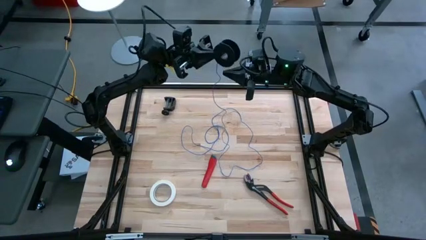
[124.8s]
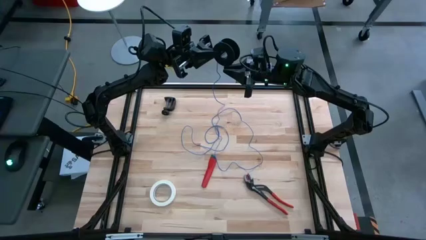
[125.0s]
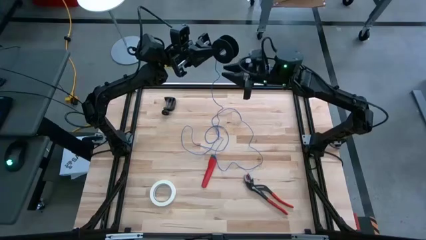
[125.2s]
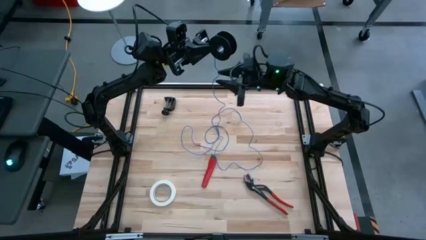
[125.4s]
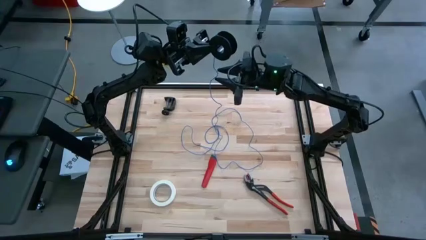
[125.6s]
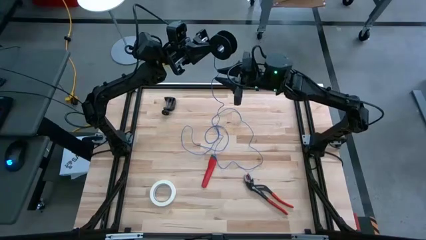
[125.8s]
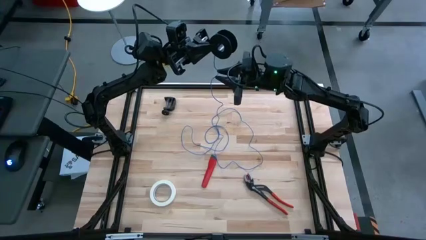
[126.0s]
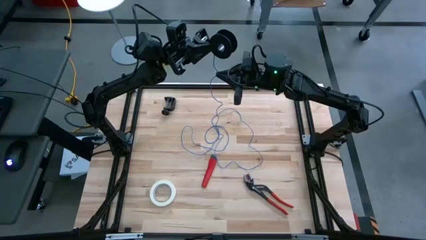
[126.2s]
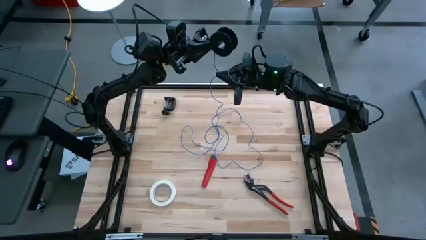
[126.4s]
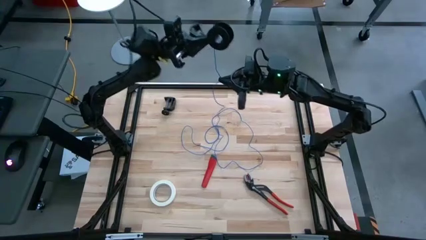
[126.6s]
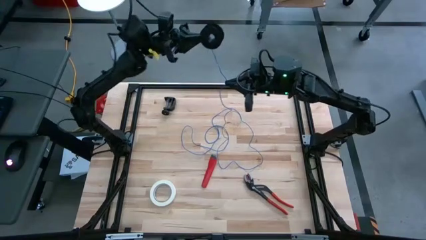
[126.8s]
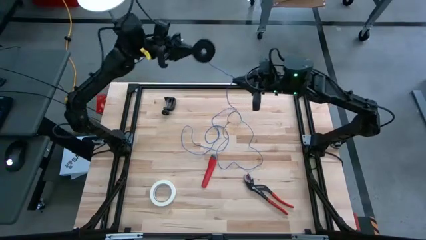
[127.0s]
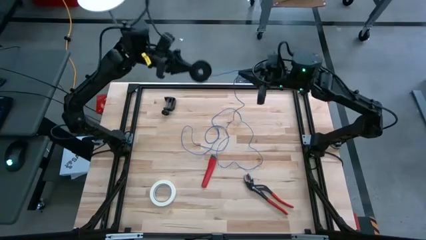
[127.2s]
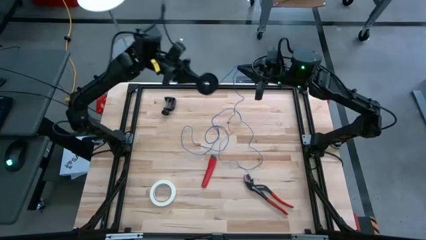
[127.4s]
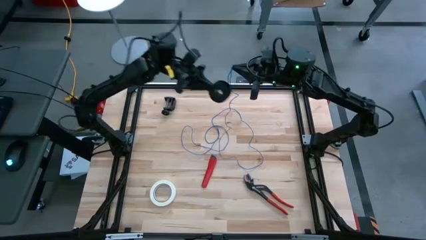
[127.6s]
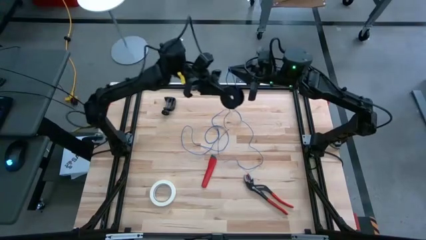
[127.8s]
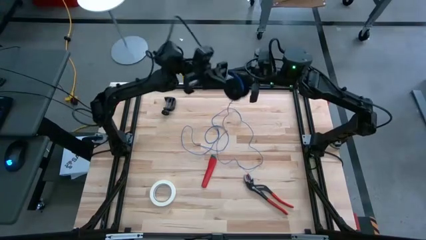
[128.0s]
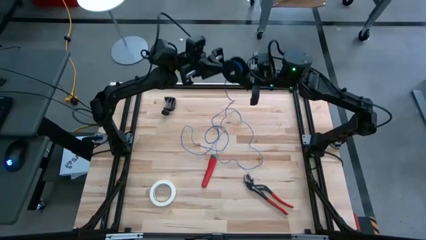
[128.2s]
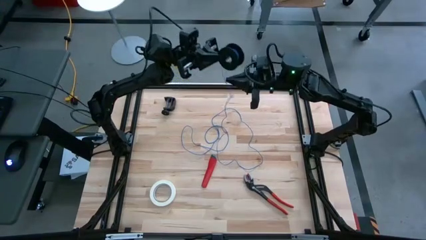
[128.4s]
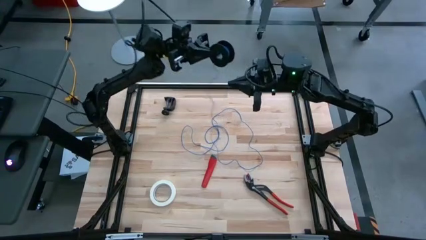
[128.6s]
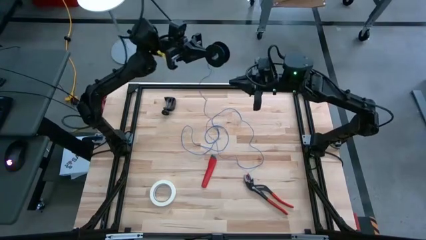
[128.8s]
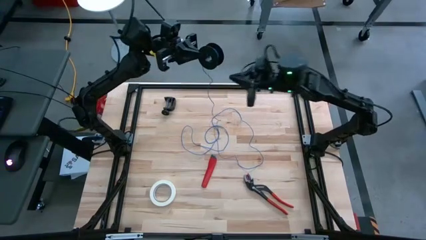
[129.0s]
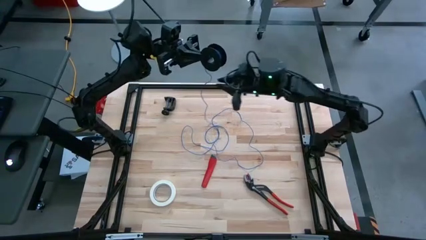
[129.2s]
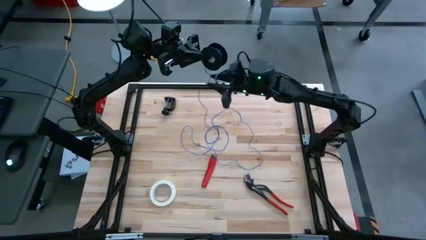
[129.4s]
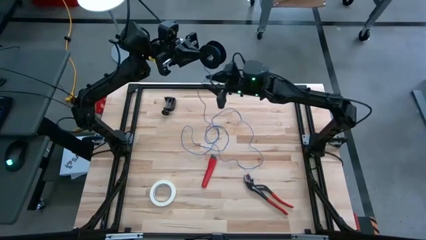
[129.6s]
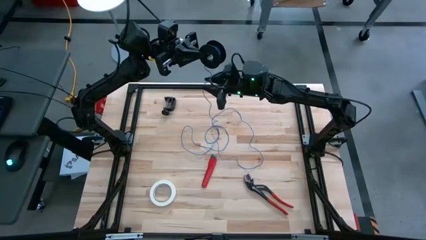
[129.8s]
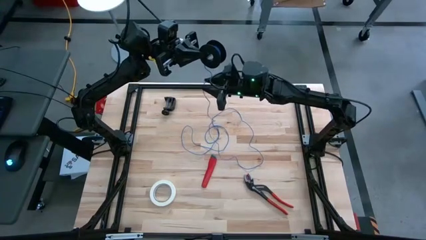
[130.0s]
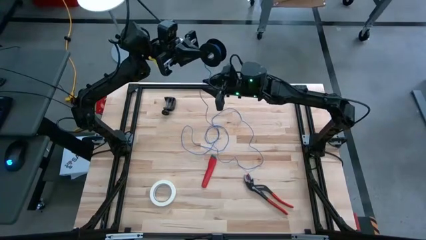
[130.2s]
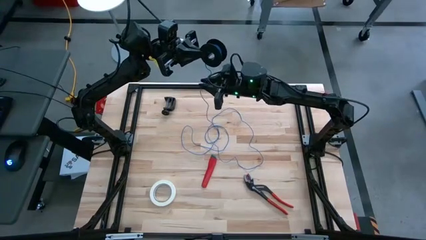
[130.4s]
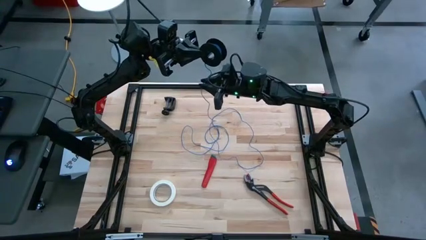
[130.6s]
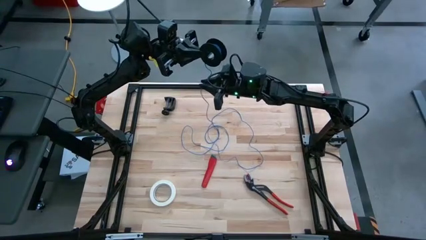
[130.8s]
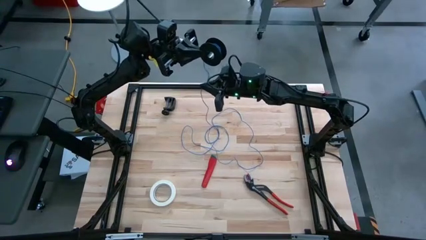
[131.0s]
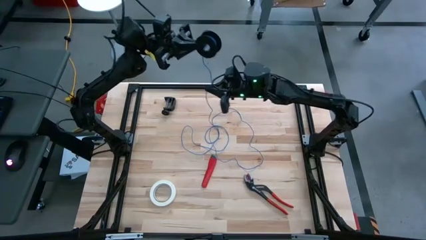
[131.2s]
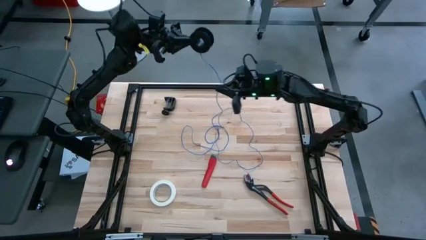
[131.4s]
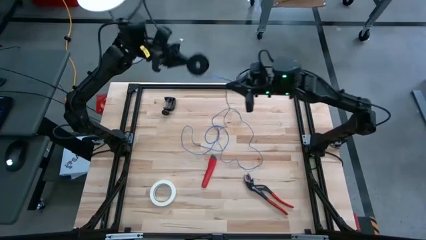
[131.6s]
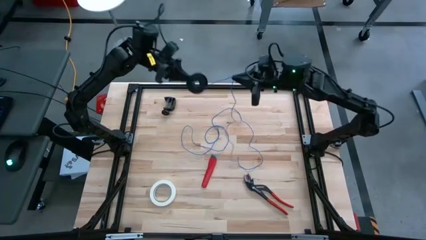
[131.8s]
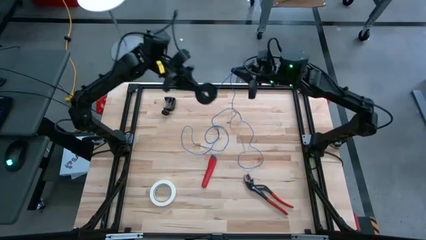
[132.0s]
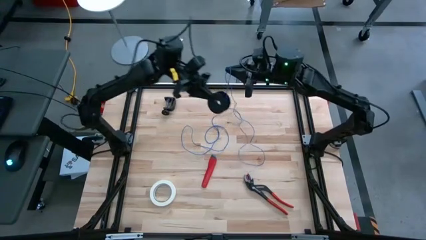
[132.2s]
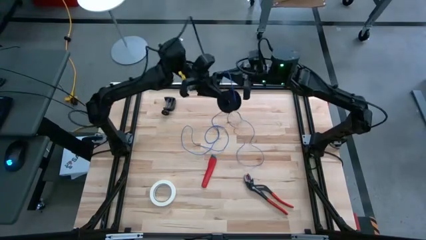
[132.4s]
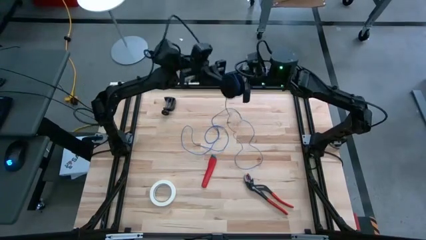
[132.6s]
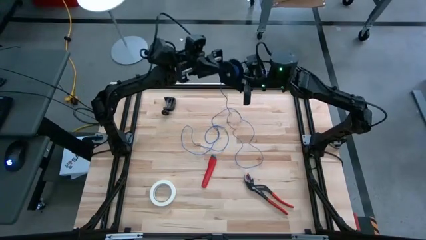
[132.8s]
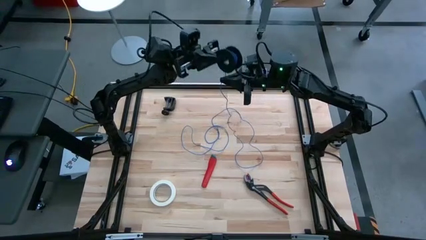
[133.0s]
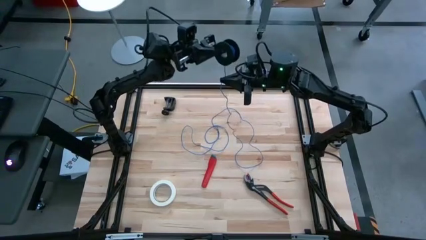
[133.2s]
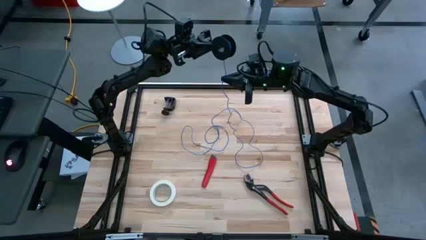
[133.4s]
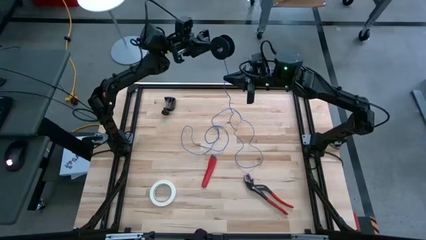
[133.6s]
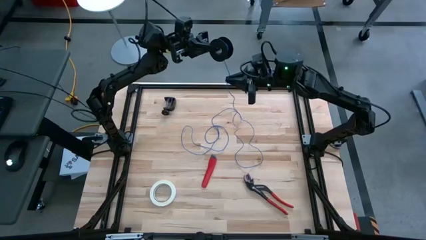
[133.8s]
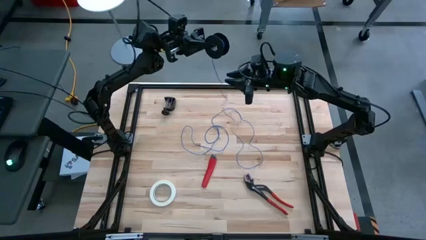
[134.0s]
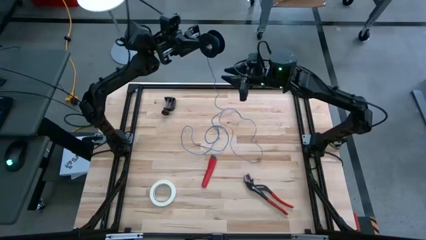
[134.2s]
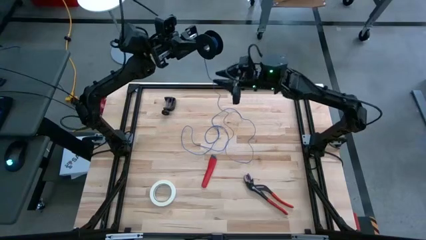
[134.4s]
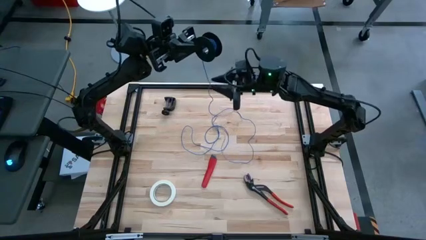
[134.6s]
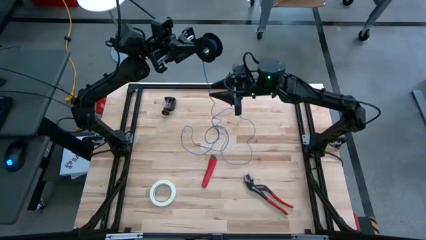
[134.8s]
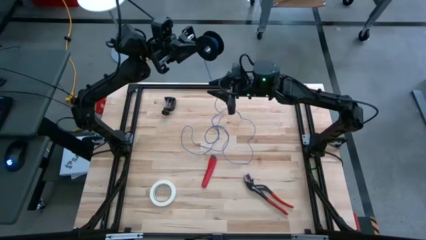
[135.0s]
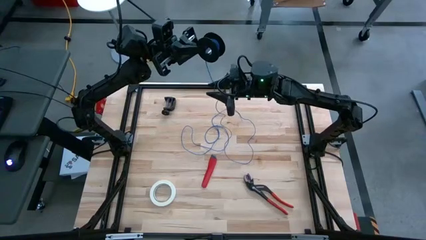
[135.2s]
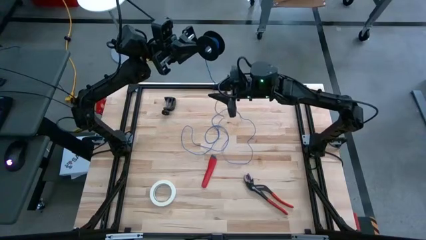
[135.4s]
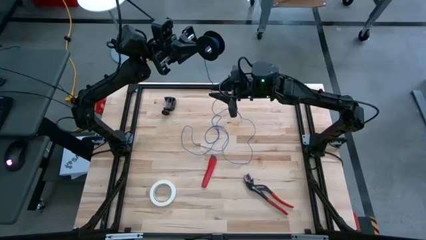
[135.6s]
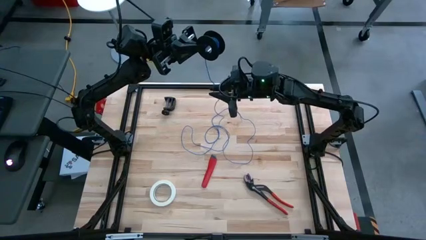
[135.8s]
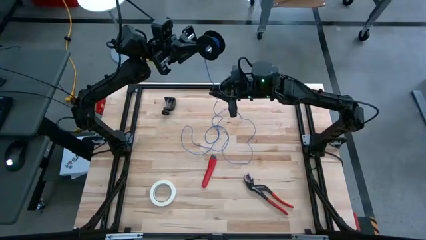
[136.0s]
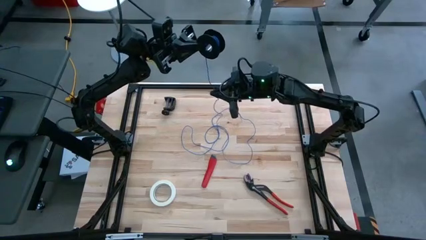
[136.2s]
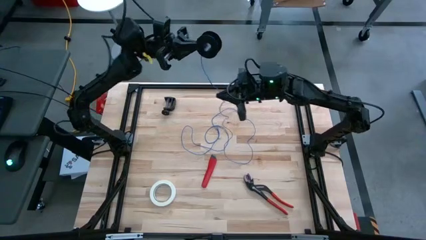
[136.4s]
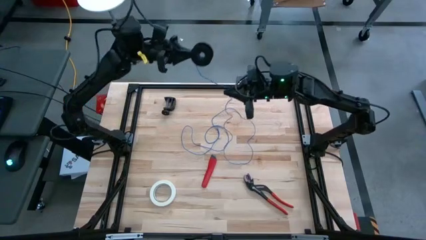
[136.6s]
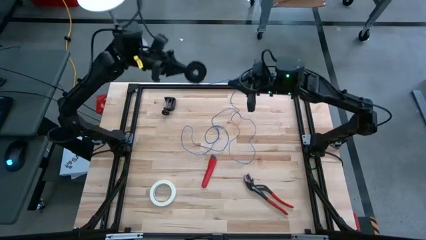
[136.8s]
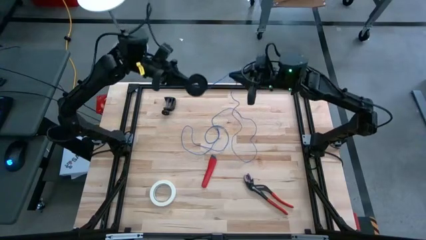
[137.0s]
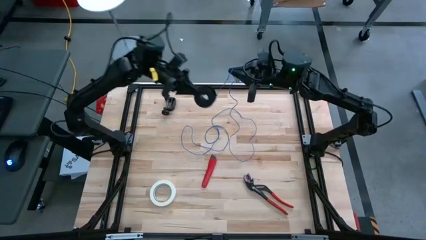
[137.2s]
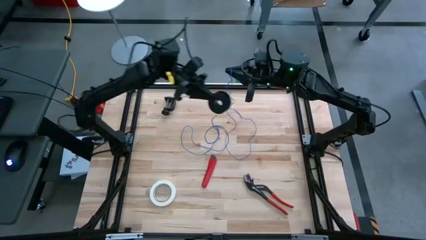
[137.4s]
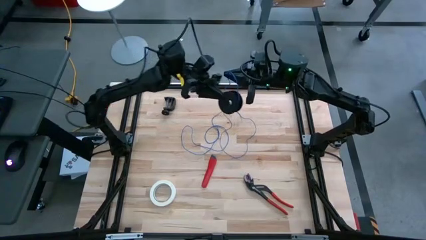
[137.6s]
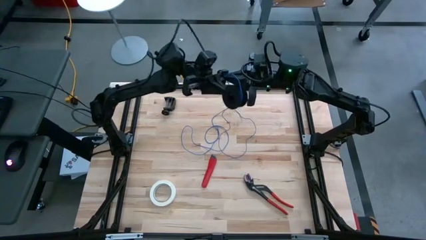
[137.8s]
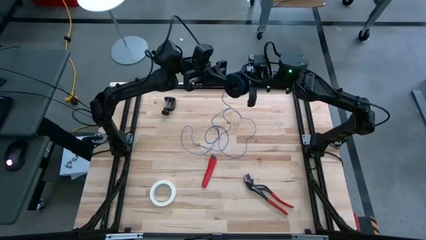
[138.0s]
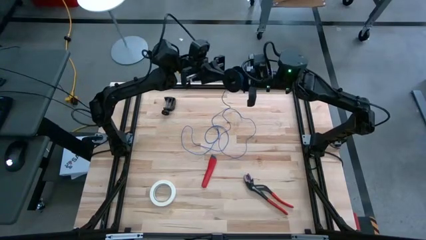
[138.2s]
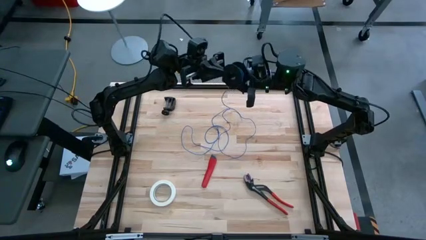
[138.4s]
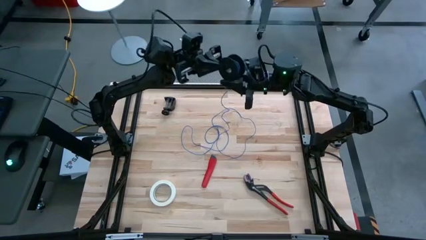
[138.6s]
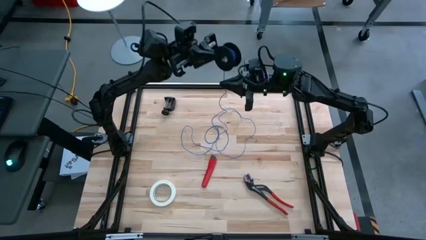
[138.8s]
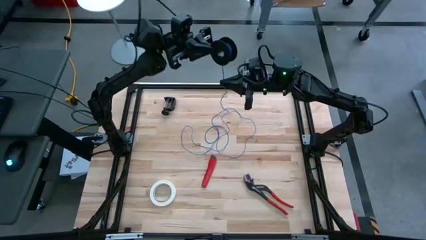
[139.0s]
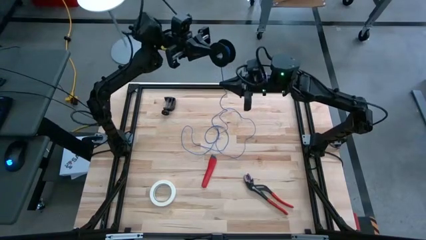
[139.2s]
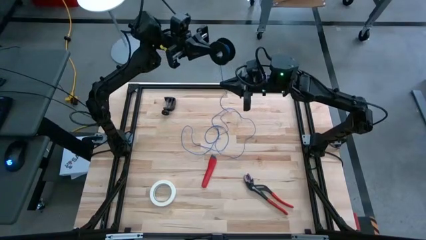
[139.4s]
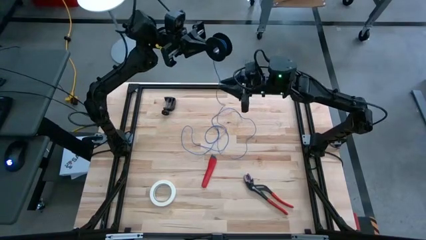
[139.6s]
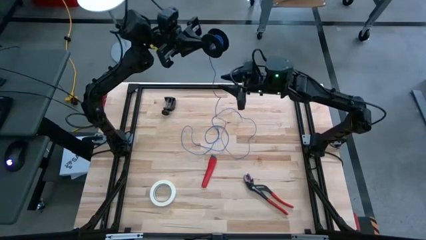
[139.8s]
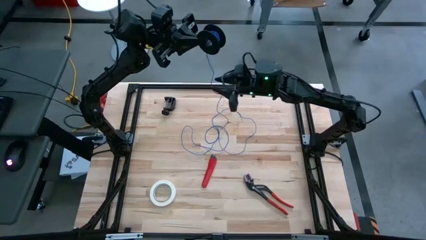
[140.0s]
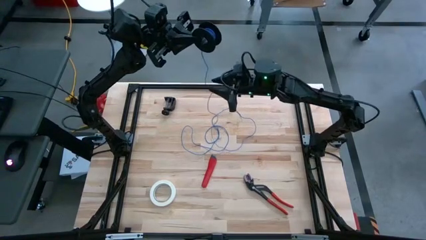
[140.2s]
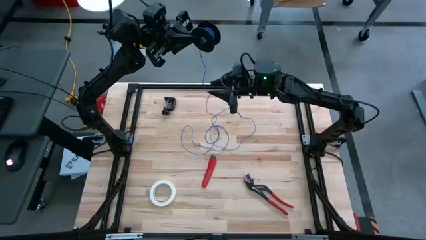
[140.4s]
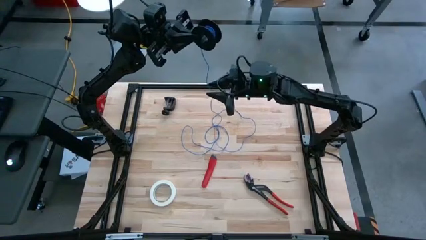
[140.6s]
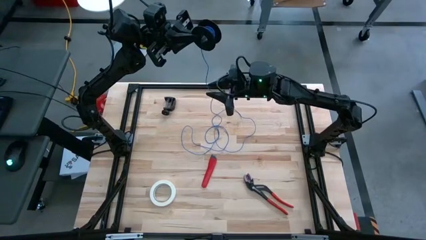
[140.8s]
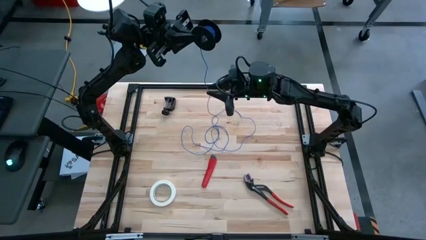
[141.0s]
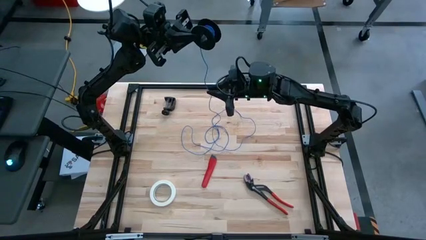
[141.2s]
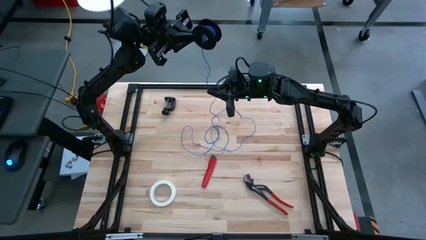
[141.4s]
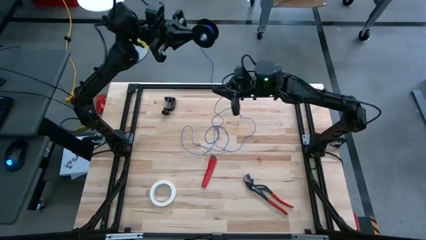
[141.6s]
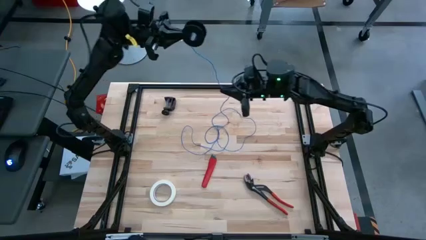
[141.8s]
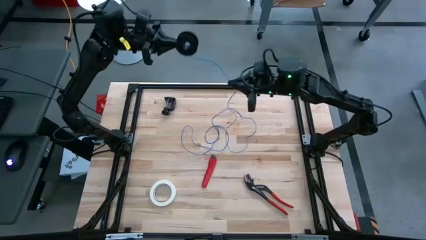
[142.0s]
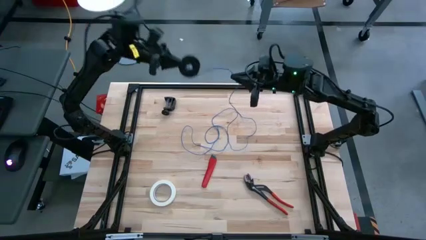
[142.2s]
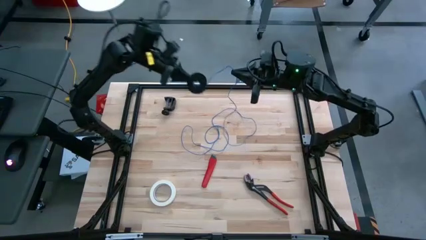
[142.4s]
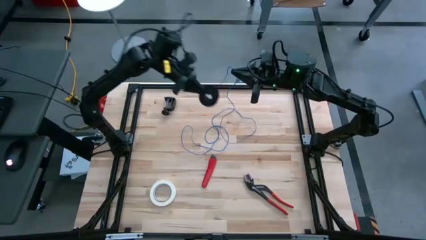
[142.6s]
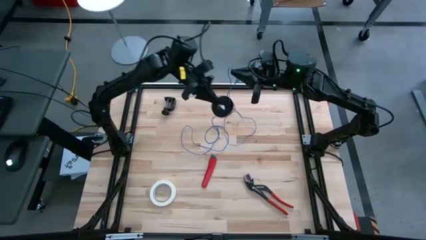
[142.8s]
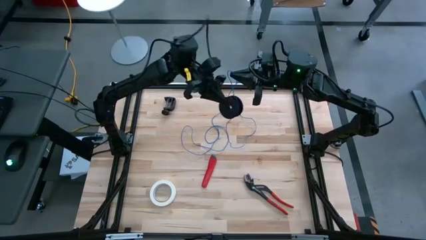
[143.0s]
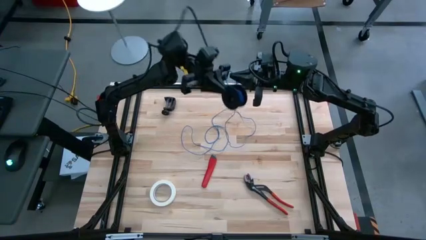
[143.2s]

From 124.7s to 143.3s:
Task: Coil cords
Coil the blue wire cable onto the black spool
